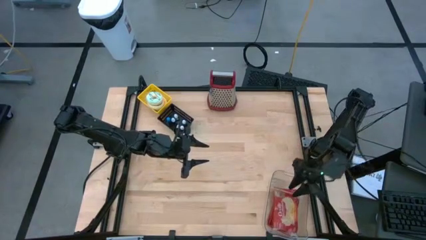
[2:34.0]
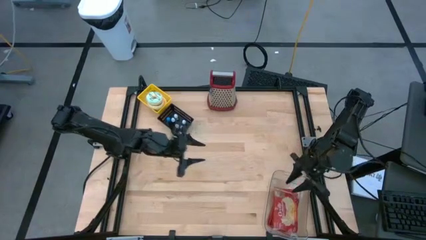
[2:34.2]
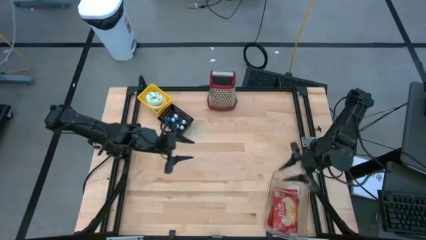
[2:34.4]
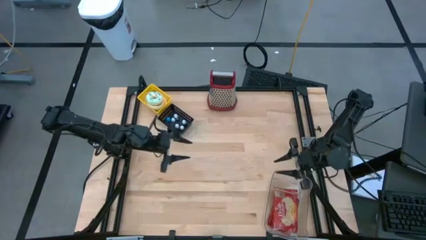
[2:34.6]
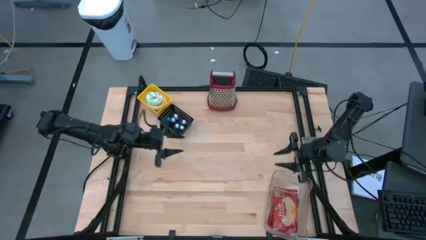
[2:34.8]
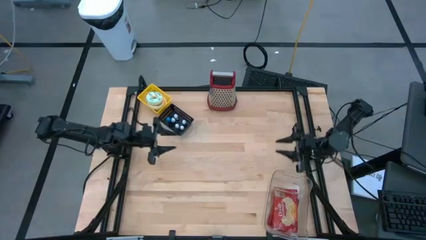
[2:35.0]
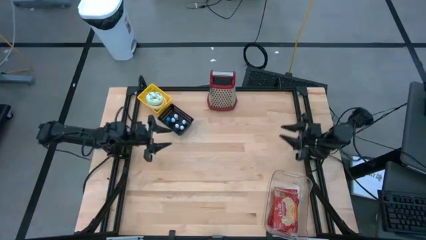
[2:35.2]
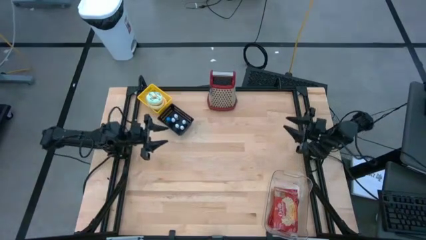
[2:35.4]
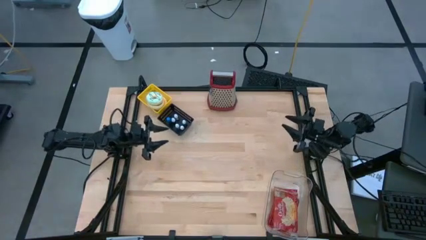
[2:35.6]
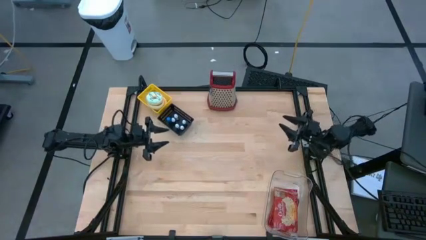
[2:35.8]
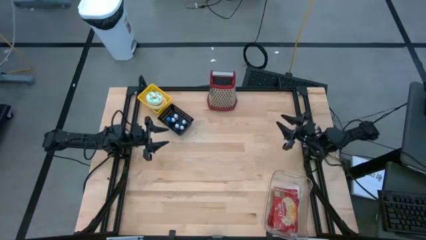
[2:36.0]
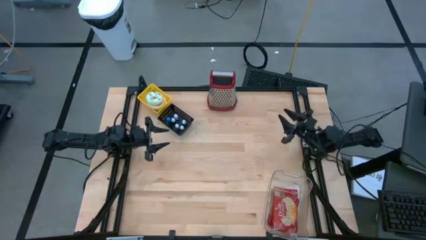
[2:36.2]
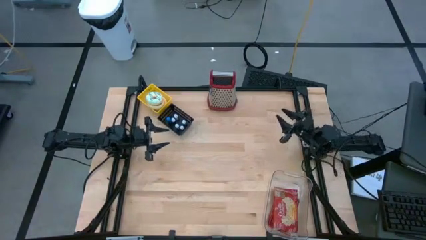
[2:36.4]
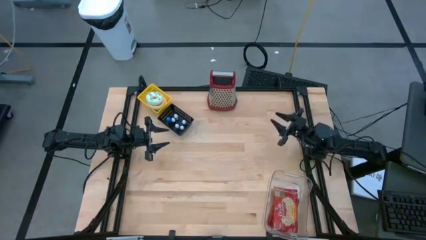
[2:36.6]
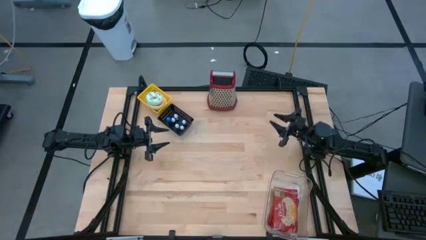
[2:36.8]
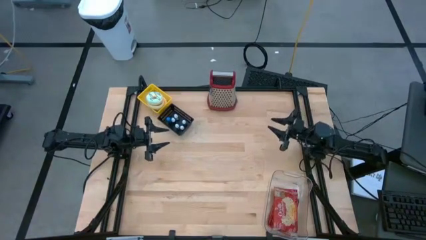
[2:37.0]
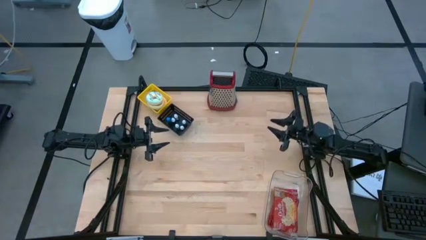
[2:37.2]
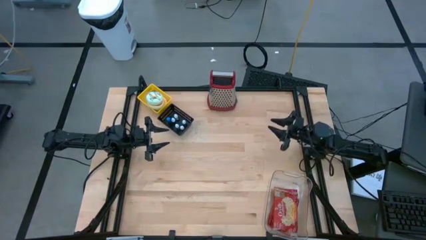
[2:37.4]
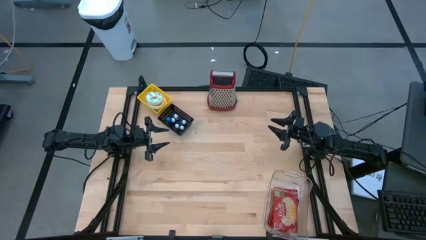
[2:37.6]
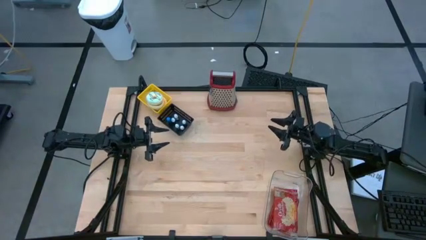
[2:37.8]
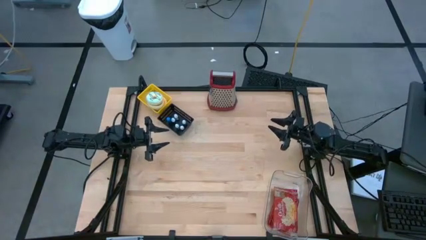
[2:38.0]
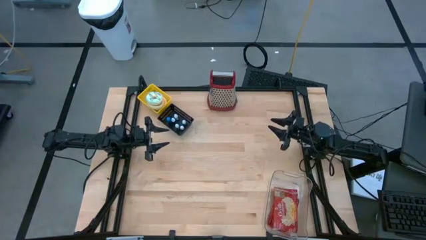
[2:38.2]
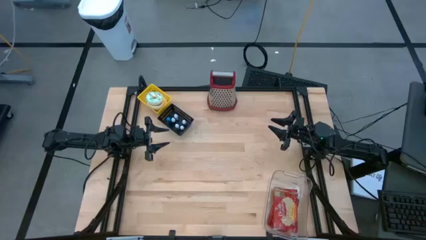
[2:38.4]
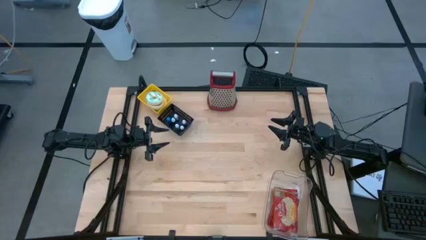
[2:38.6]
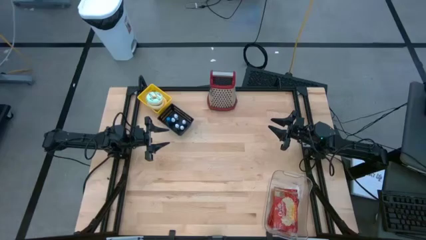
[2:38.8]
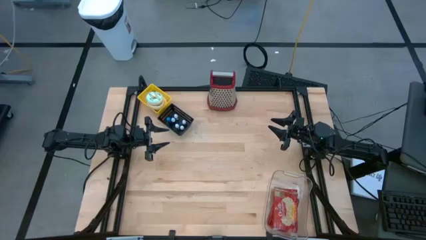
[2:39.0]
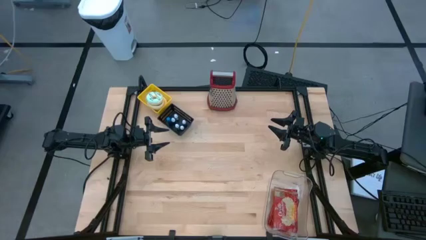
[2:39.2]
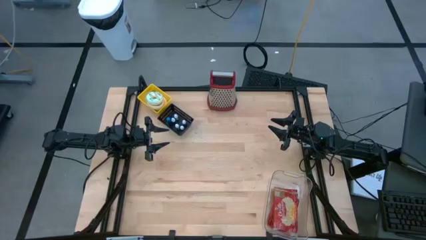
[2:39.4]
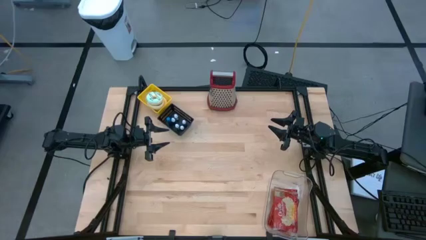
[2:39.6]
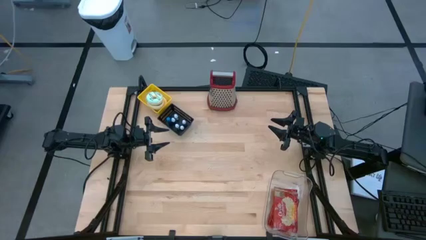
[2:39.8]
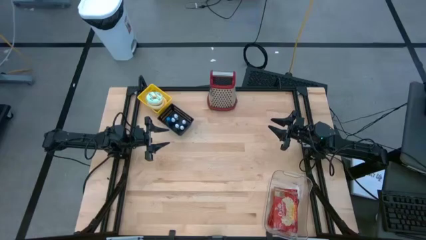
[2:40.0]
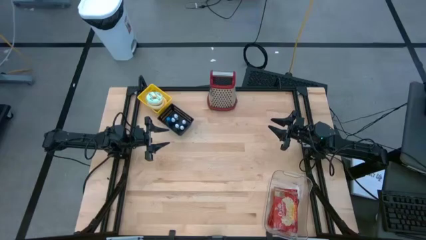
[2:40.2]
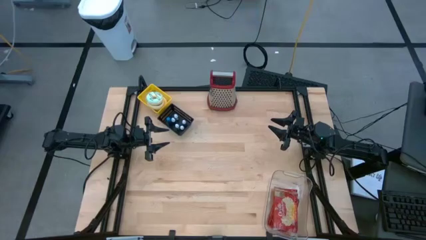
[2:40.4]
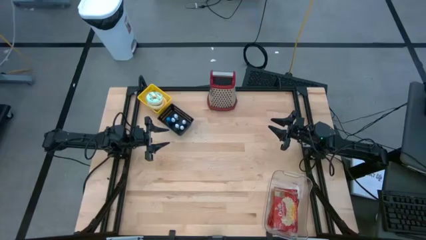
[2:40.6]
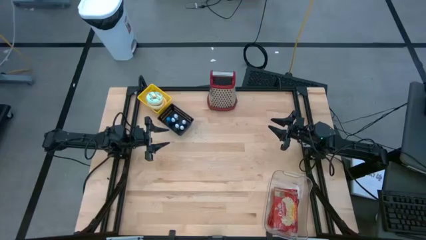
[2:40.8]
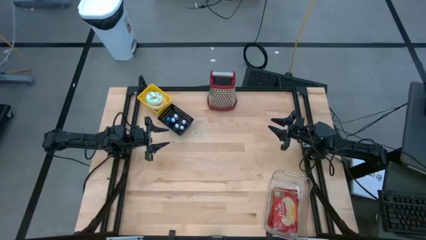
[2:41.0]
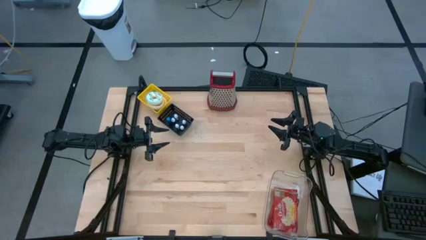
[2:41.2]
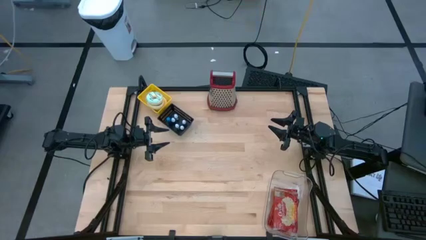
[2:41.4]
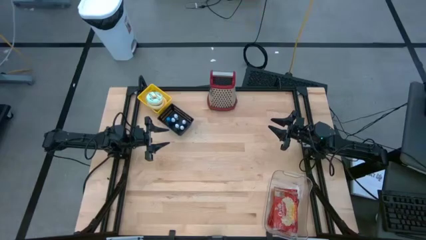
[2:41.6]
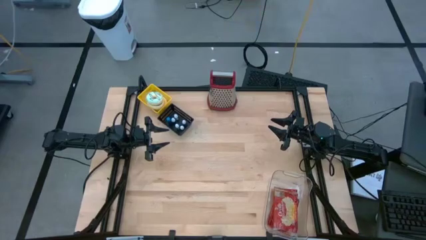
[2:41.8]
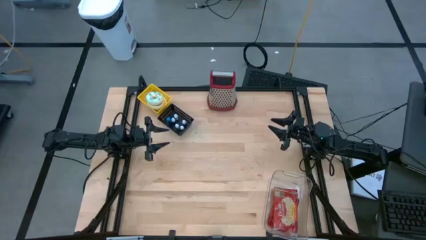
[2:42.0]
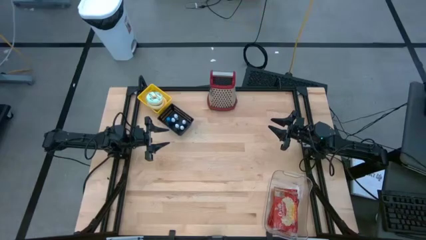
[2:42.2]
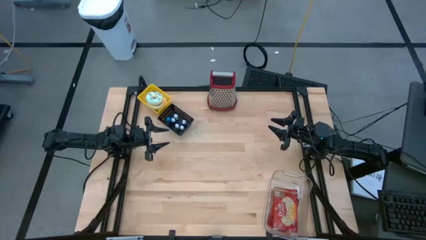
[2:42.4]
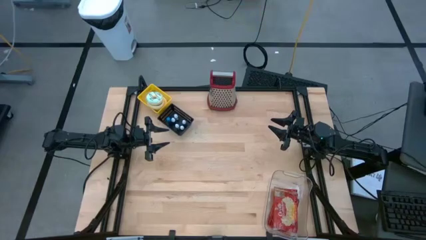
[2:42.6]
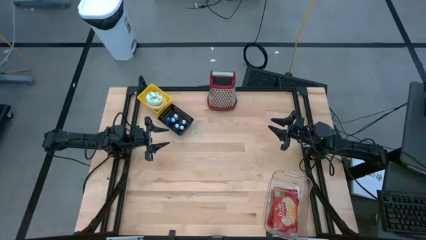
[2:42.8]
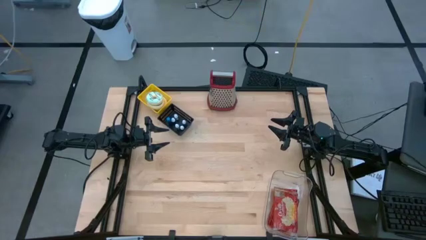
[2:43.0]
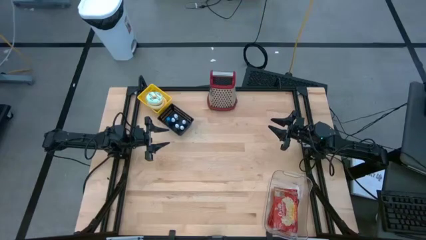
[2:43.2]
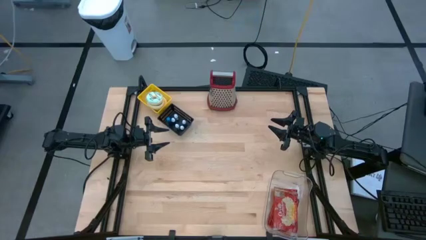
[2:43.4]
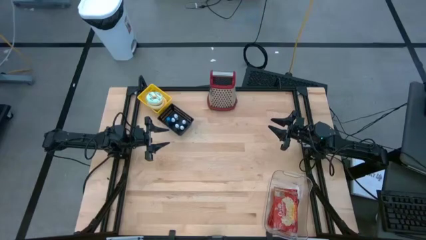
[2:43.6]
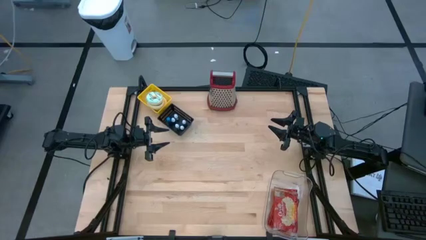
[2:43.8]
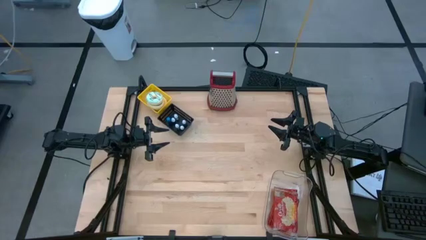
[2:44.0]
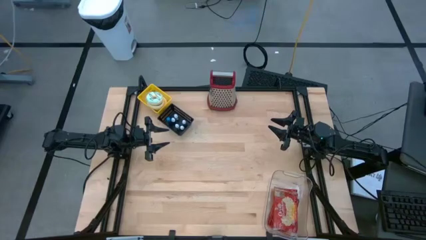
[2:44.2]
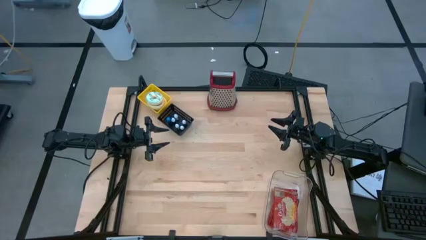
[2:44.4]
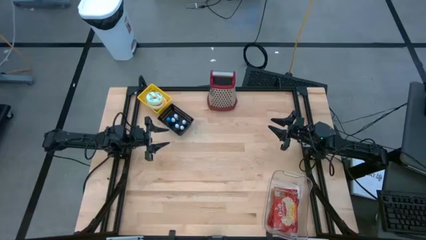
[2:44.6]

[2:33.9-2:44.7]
Return to Home Position

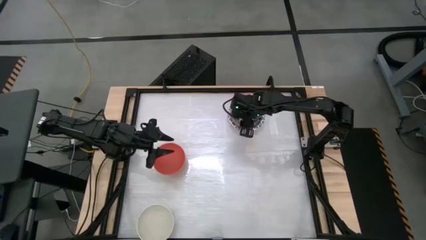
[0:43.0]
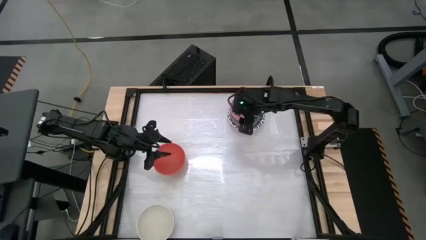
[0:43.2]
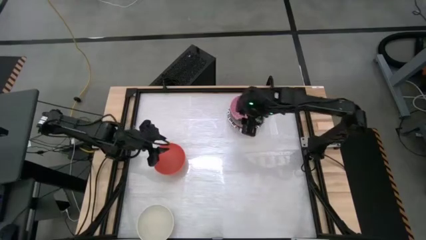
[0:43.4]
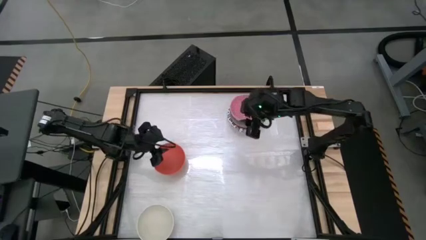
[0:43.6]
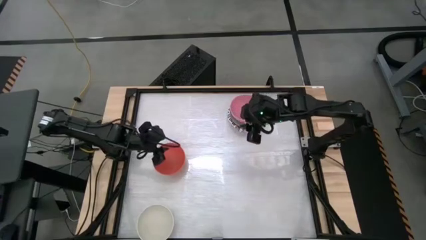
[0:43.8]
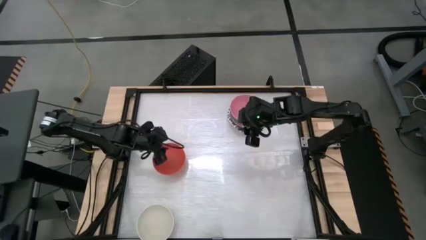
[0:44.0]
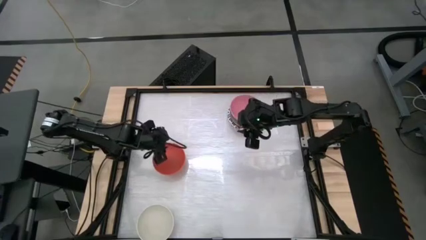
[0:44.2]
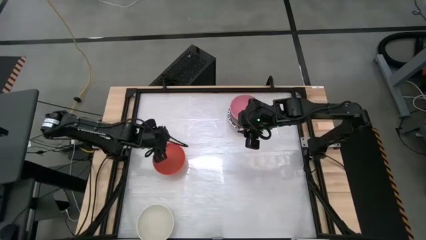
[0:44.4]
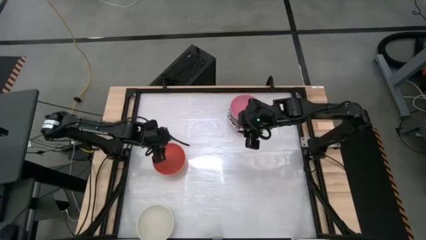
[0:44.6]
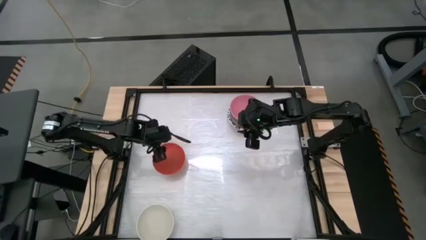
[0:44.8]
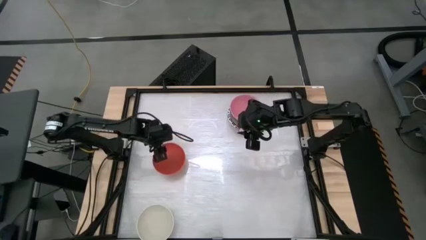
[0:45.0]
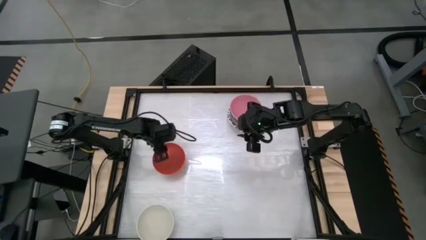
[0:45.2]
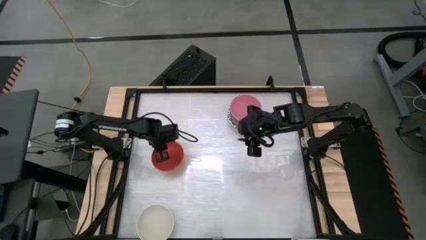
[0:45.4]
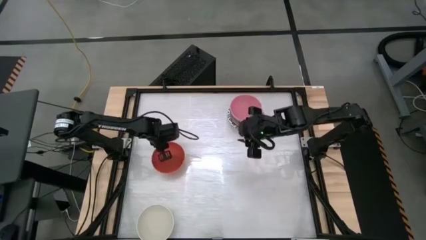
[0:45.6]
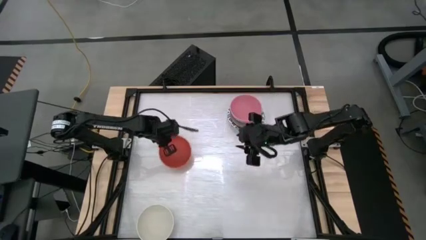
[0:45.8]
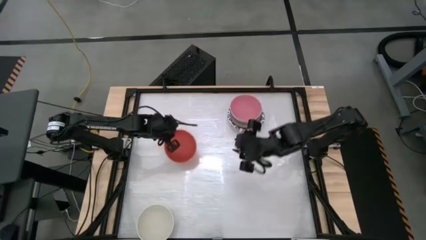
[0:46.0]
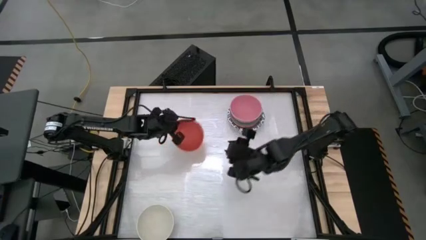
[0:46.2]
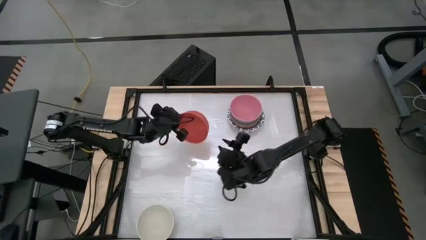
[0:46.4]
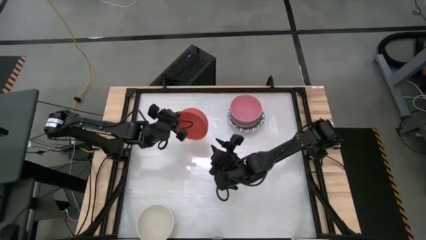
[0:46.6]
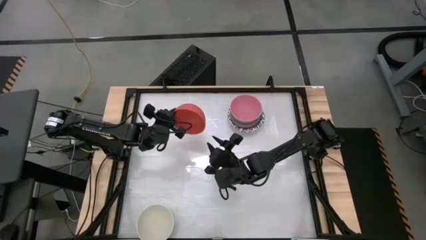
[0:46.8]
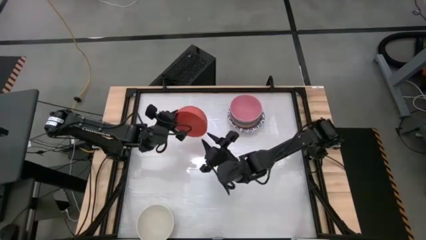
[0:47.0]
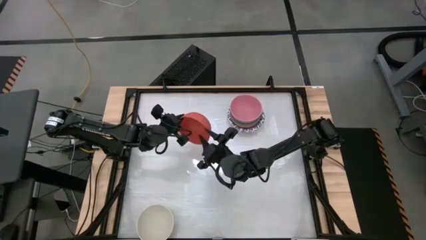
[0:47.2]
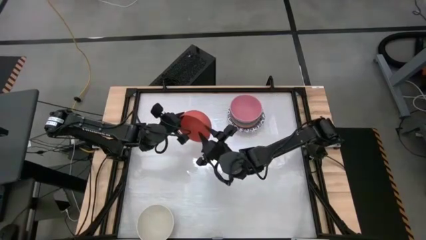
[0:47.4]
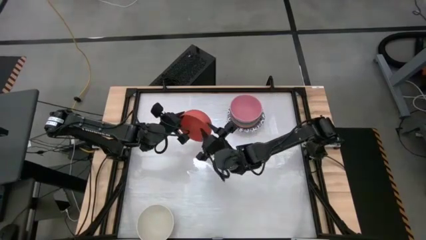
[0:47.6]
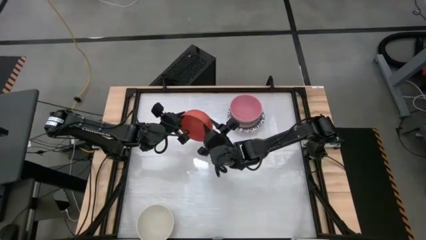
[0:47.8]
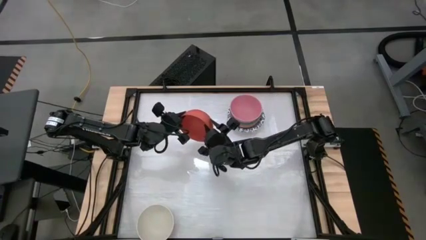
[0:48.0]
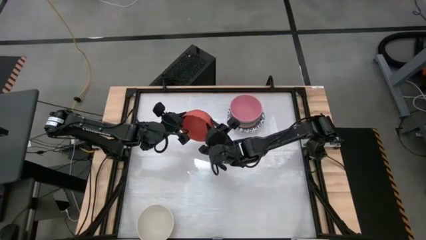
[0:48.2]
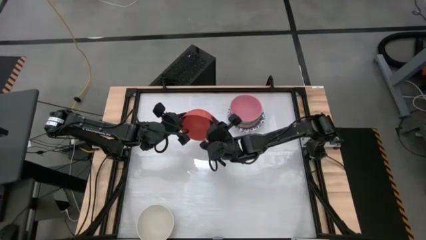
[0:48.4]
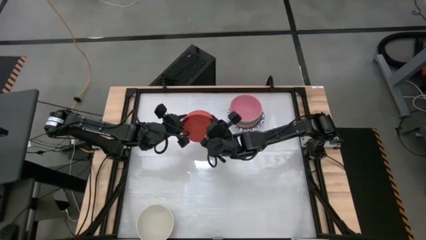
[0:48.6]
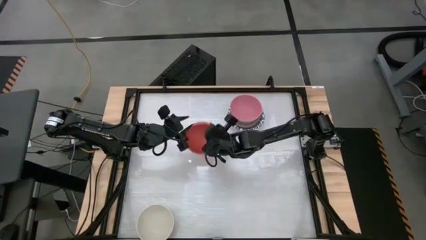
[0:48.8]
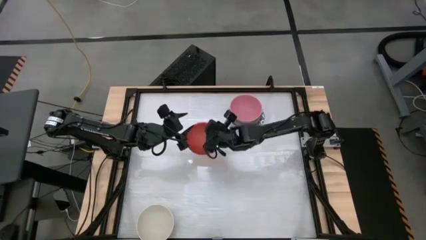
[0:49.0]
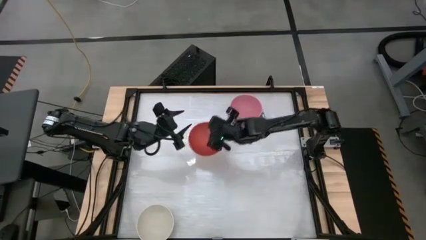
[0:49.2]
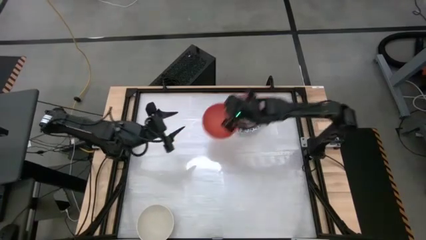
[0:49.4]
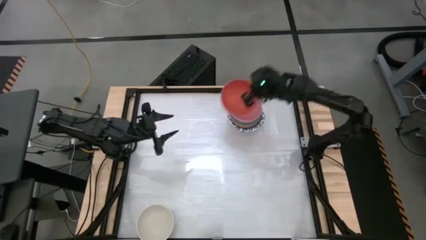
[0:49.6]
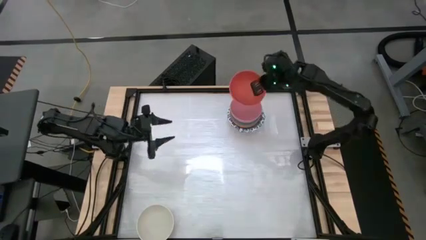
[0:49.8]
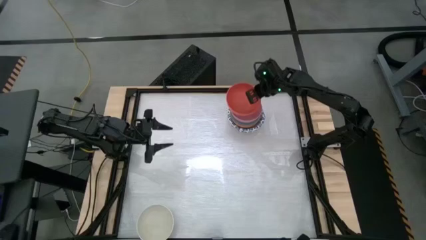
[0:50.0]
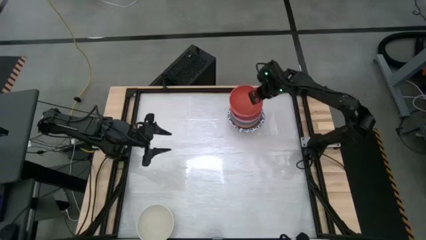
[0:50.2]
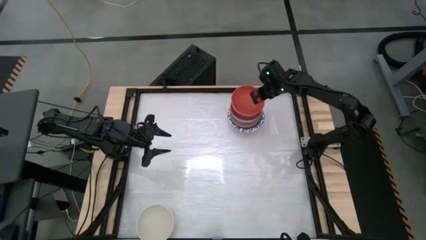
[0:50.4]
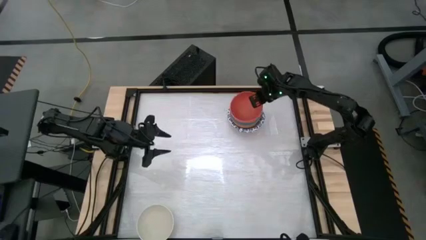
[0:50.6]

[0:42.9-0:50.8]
Stack the orange bowl into the pink bowl
